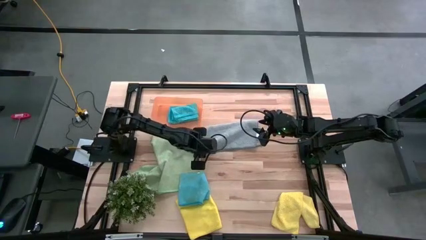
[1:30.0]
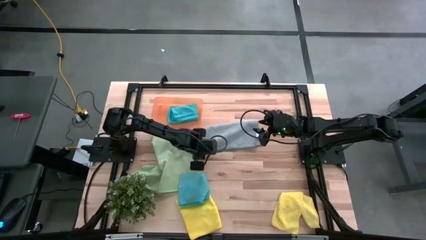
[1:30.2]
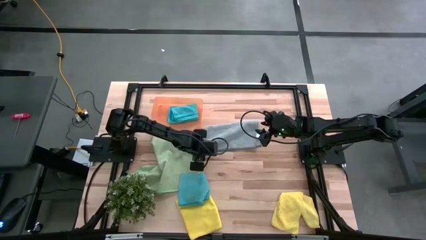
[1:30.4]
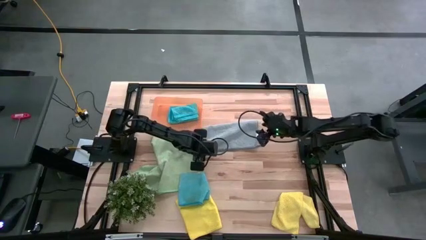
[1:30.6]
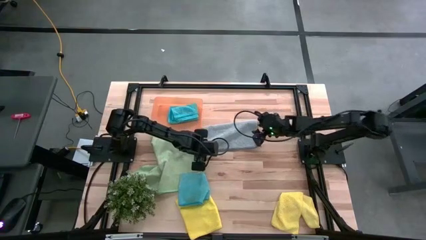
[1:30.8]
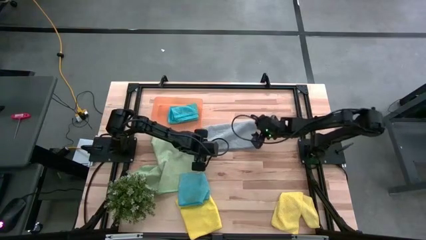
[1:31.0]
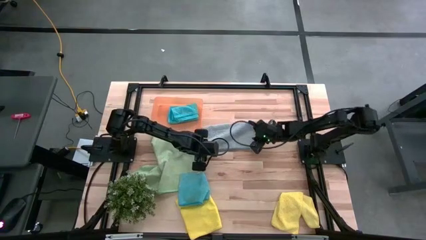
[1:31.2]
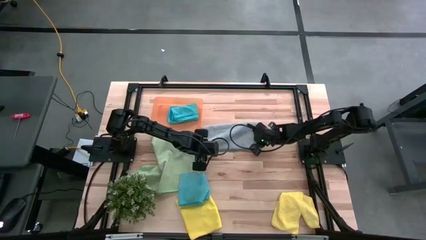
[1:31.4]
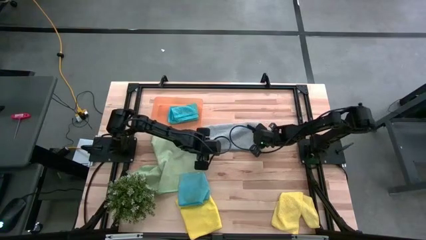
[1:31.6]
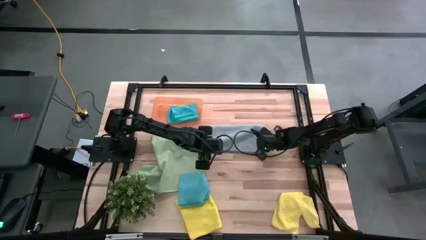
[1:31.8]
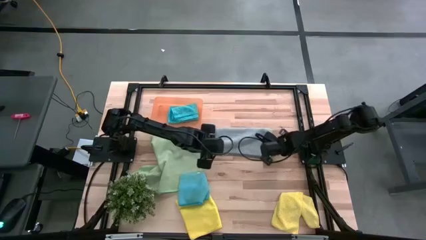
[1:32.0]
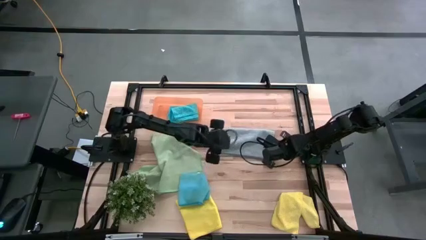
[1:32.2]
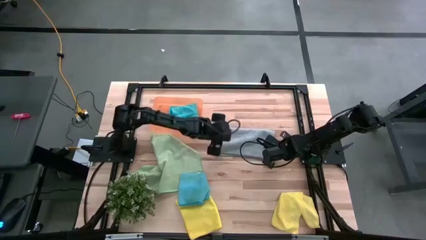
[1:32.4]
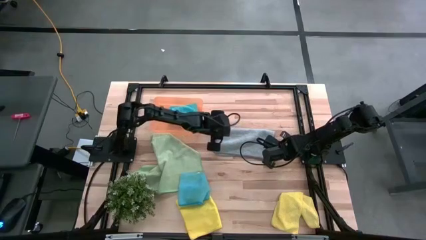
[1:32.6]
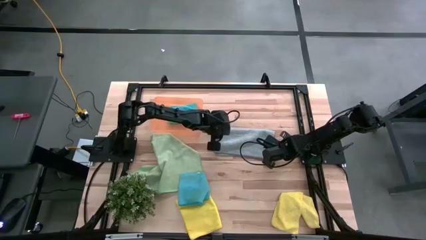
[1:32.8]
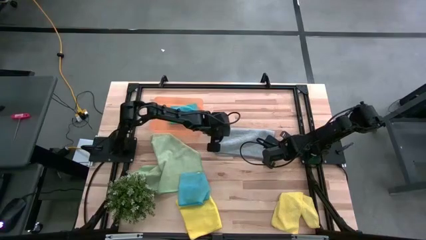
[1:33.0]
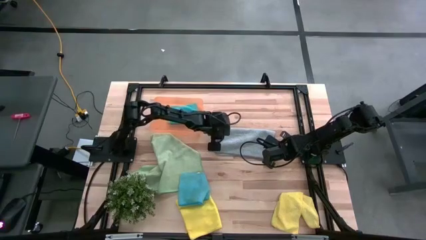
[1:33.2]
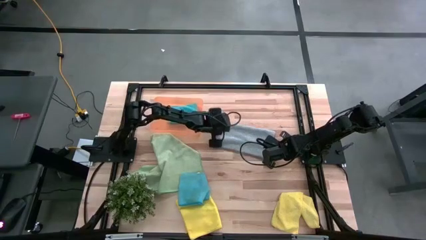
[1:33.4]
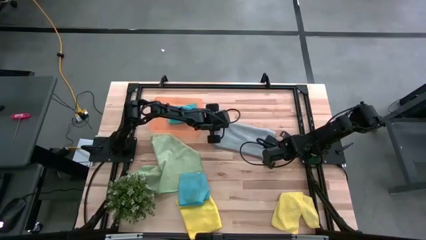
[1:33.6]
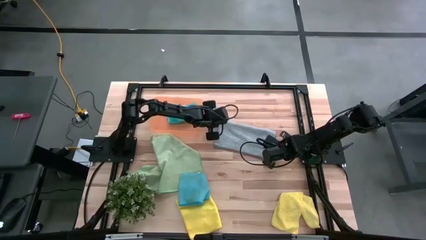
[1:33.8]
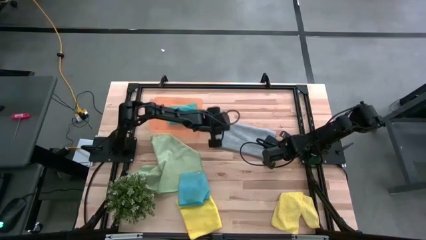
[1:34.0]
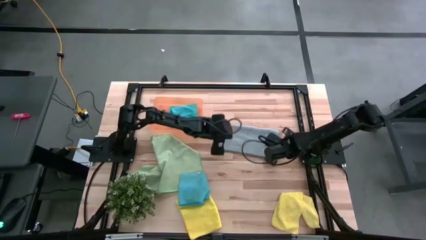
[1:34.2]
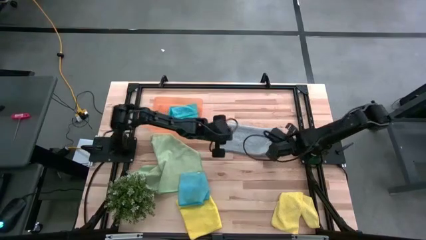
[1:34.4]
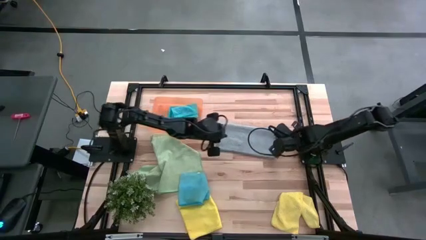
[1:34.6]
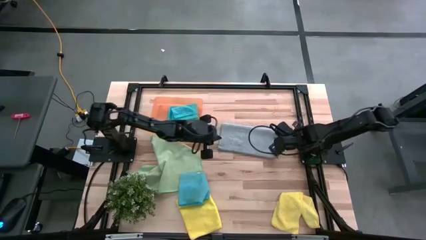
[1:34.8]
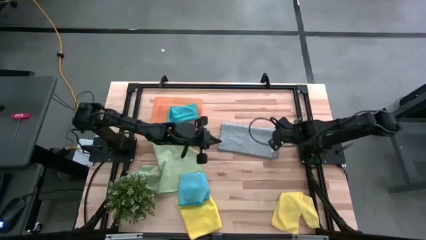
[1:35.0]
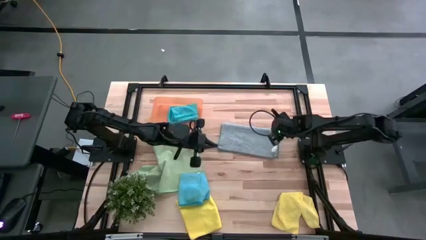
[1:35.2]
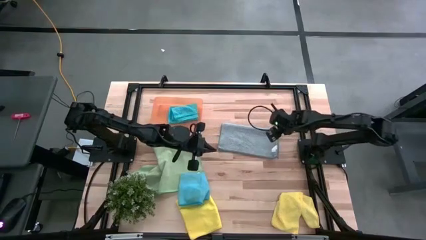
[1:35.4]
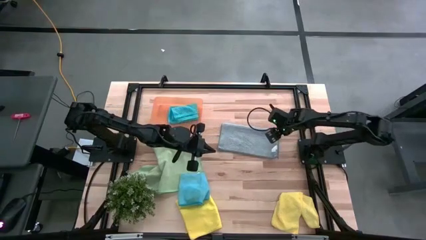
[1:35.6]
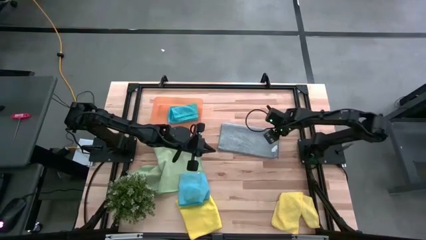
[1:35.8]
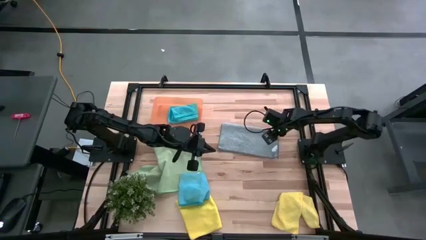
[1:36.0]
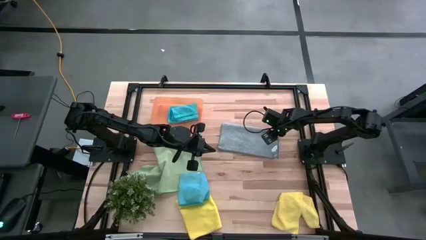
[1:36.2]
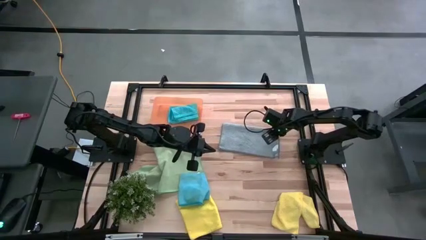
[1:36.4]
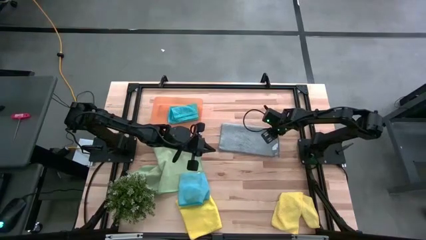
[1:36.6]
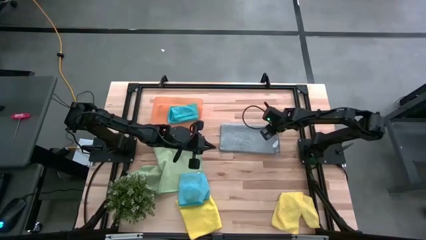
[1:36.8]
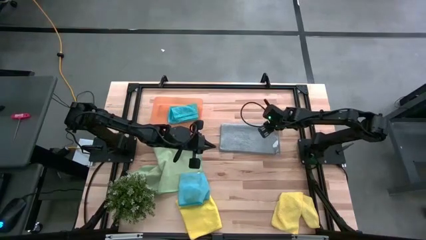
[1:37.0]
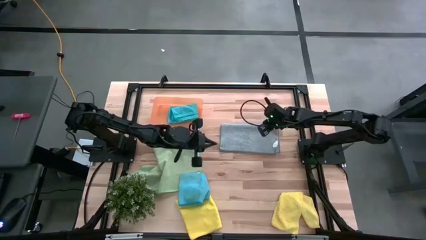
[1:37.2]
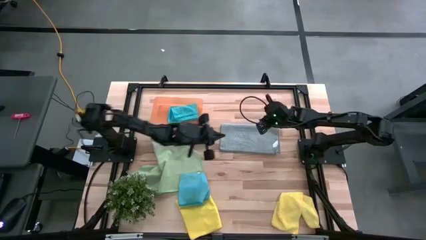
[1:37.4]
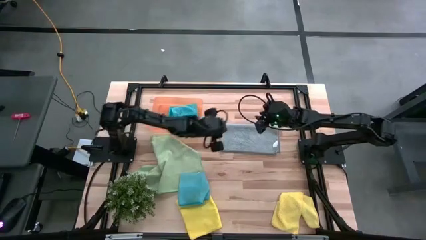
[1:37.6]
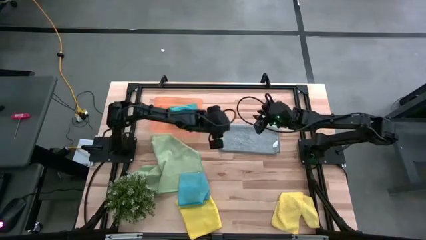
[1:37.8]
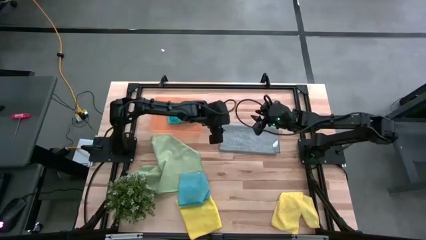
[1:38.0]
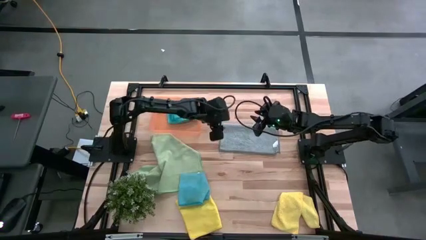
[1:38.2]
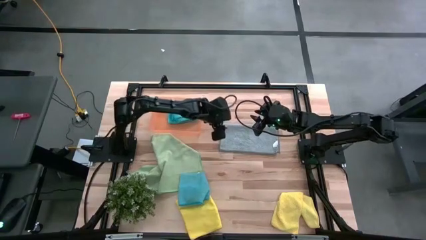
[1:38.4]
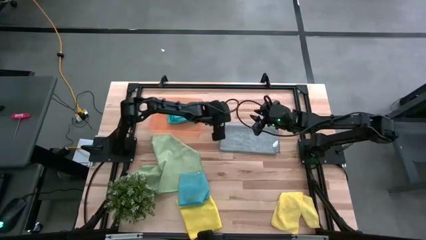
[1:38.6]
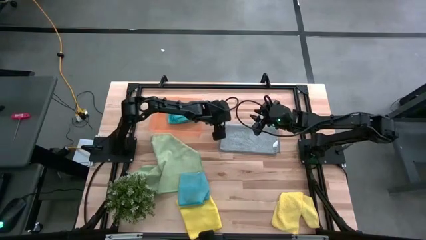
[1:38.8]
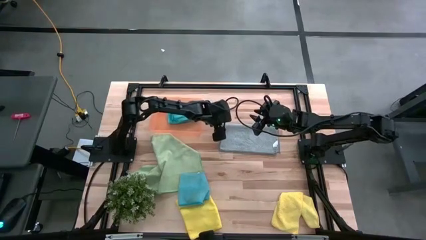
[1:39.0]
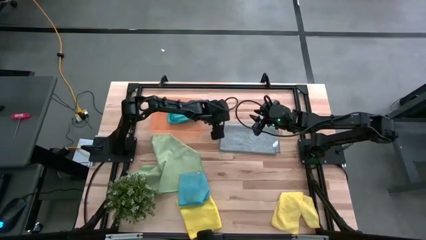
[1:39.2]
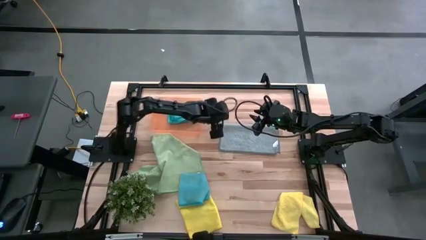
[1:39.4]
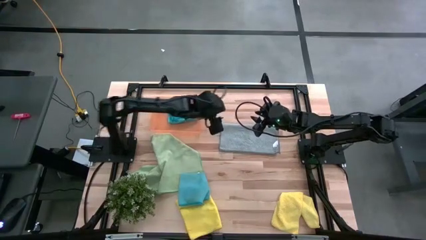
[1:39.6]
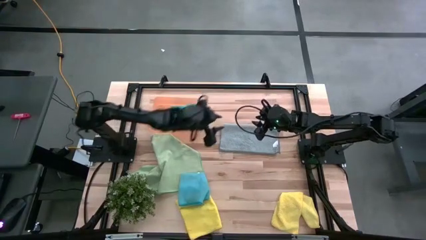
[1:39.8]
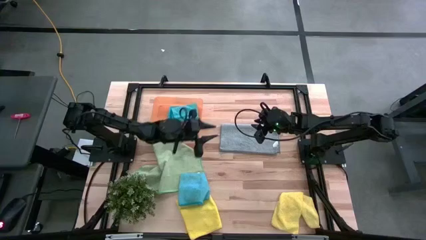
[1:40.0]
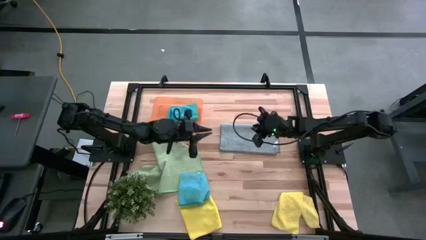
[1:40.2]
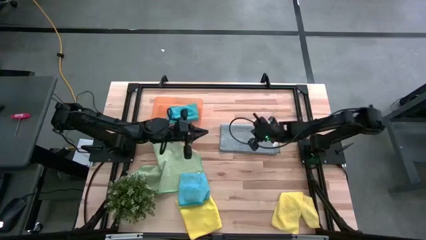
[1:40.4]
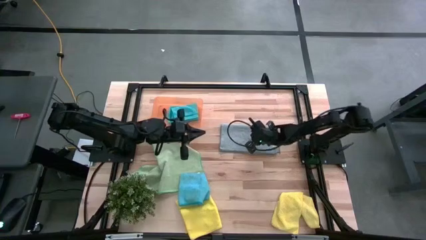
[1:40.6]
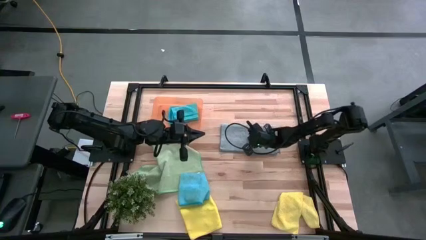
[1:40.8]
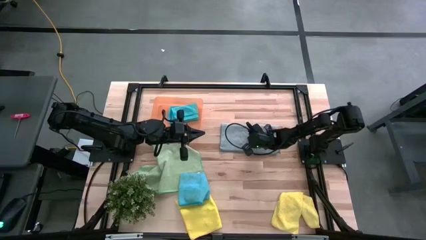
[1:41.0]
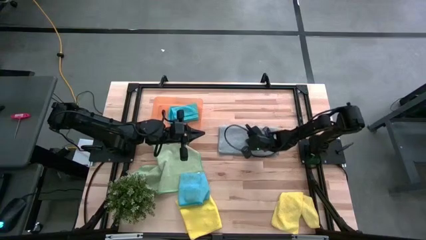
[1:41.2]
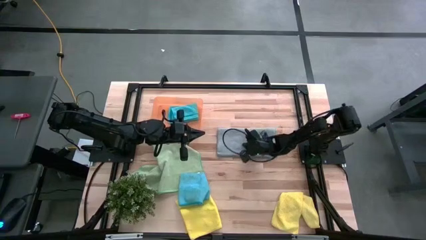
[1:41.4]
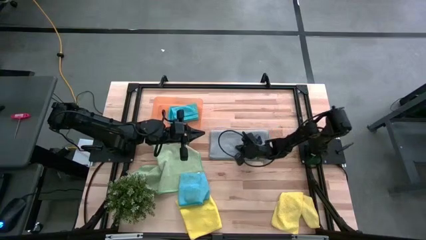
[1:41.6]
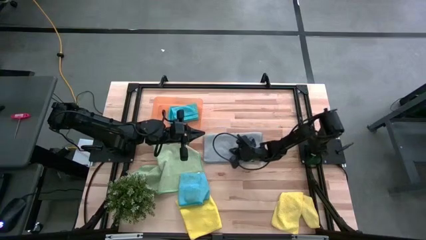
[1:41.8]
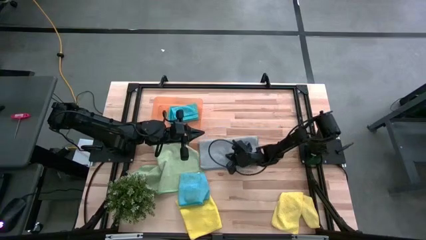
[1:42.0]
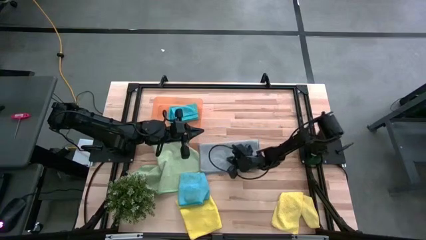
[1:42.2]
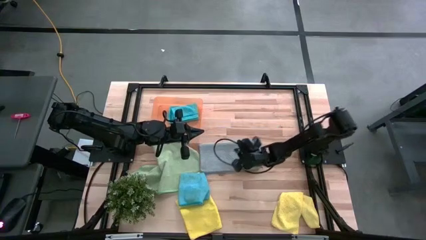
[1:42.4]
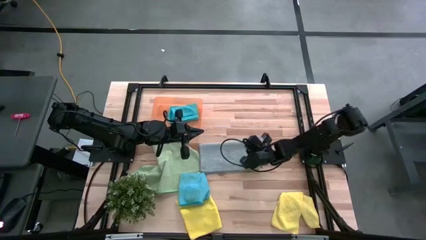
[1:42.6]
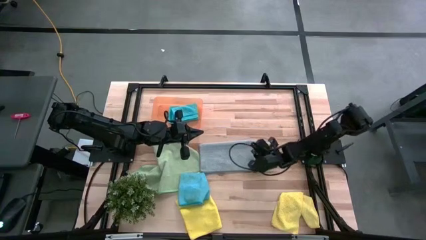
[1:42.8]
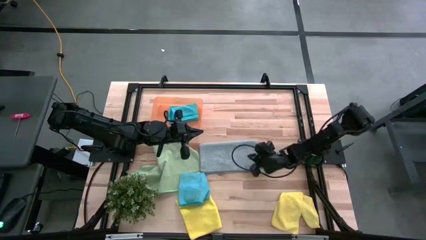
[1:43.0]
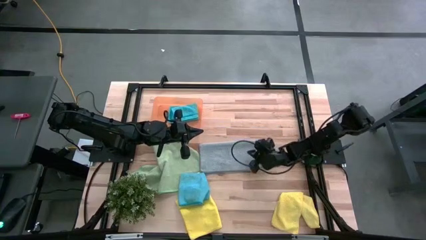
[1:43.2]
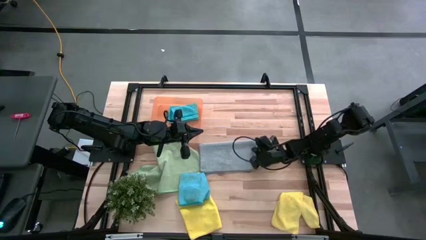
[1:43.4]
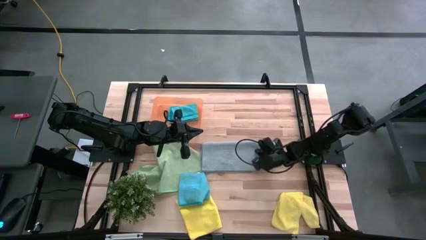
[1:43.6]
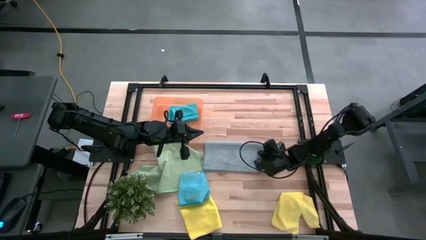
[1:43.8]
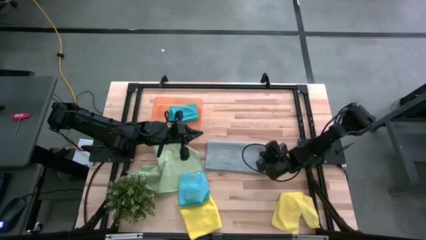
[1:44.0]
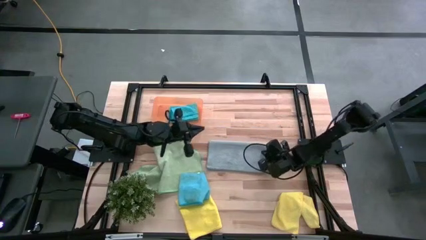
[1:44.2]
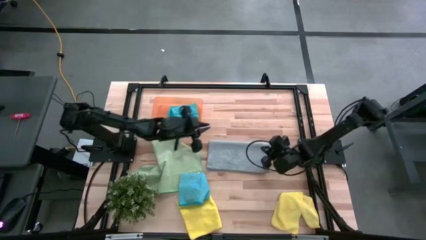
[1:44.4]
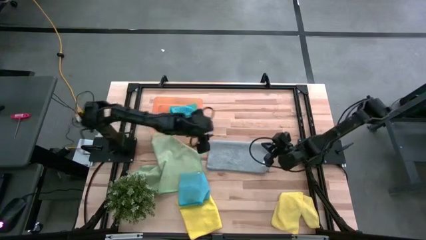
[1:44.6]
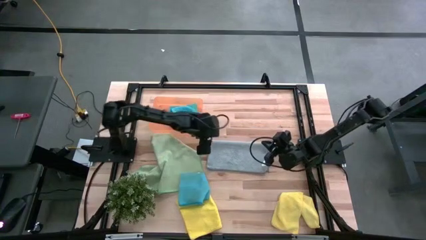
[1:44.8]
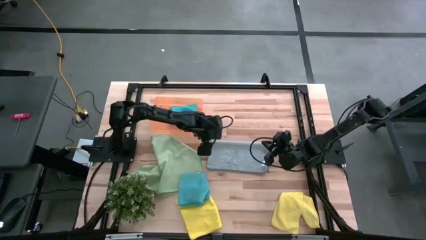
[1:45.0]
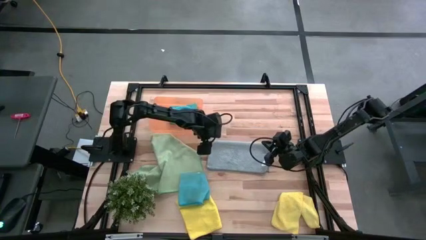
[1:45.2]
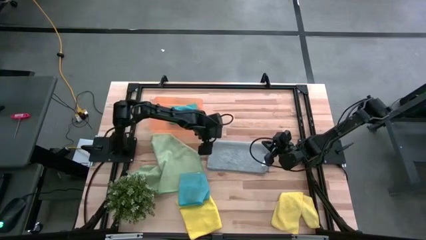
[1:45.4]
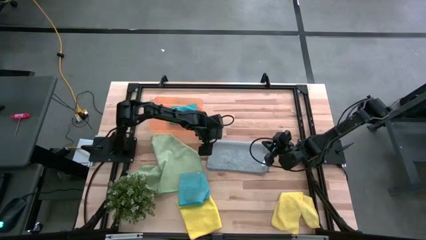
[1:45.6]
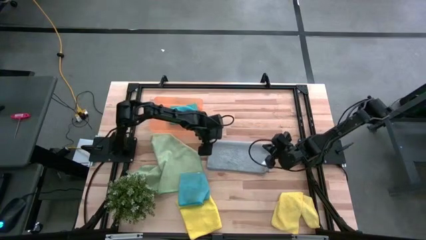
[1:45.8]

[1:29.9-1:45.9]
Task: Fold microfiber towels
Fold the gray microfiber cloth
